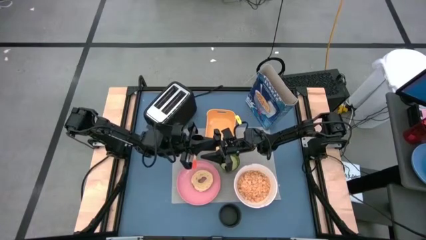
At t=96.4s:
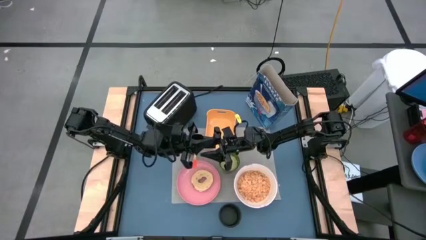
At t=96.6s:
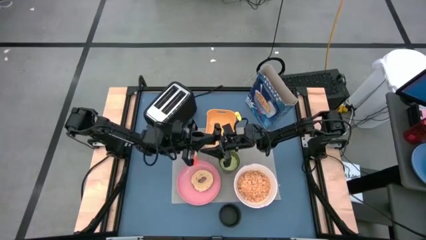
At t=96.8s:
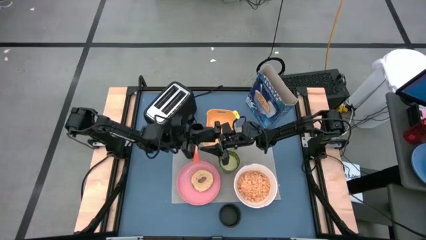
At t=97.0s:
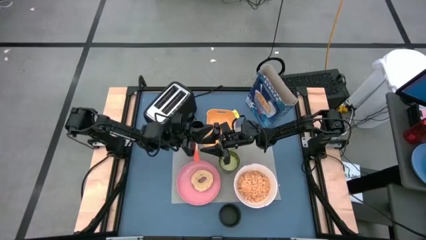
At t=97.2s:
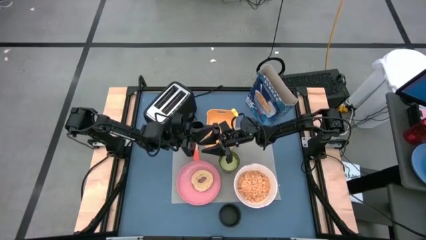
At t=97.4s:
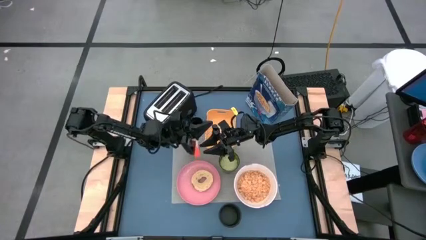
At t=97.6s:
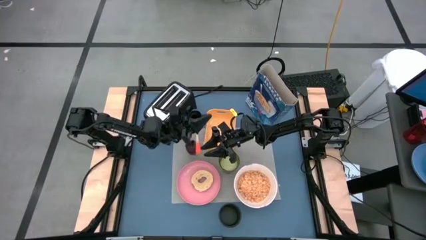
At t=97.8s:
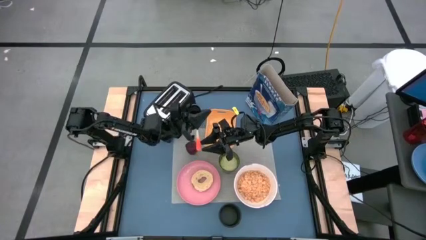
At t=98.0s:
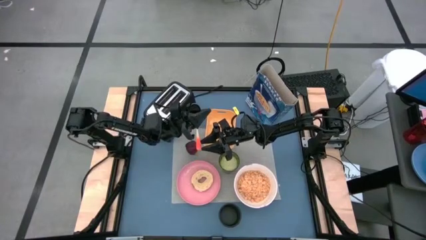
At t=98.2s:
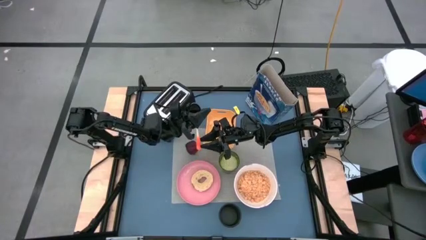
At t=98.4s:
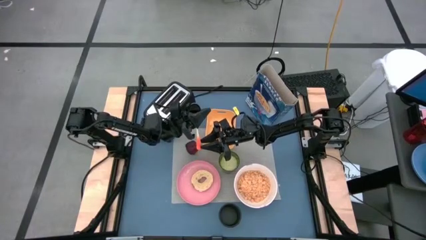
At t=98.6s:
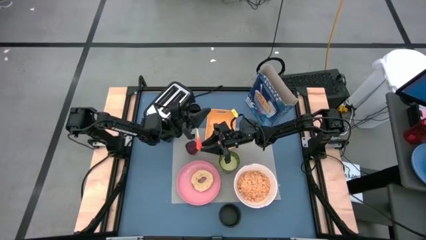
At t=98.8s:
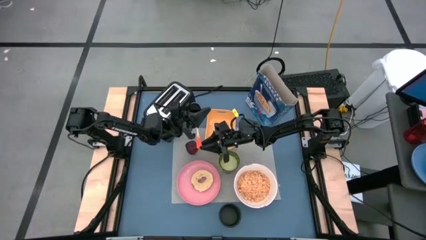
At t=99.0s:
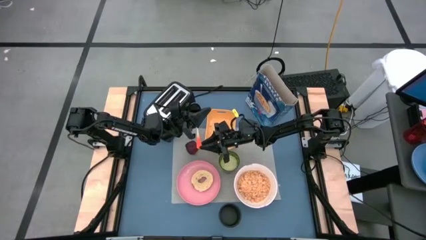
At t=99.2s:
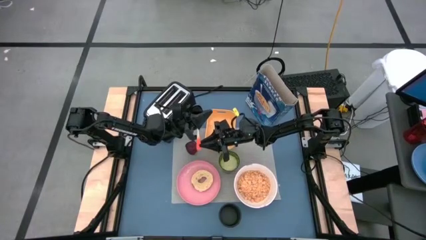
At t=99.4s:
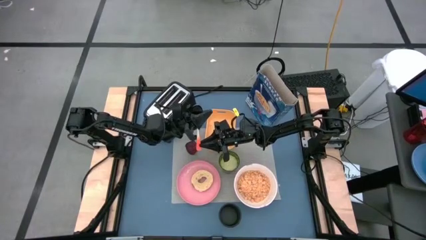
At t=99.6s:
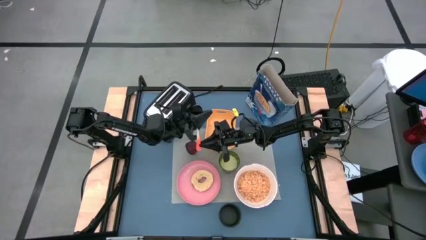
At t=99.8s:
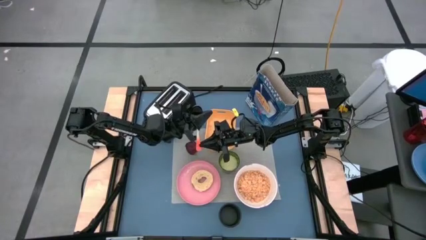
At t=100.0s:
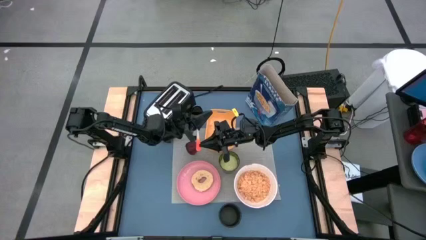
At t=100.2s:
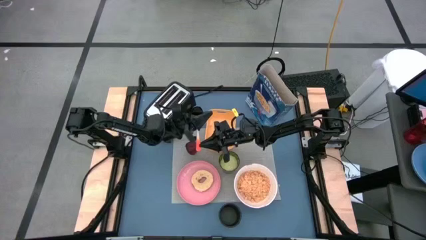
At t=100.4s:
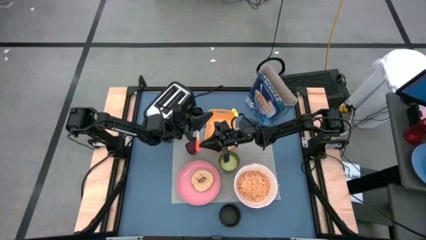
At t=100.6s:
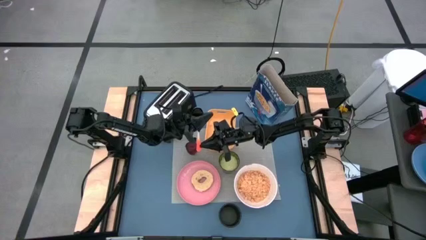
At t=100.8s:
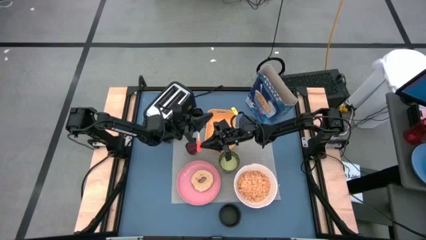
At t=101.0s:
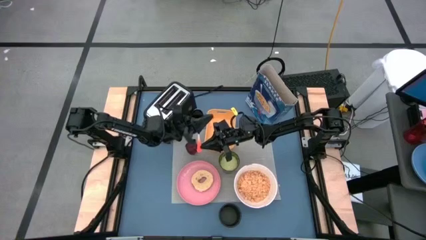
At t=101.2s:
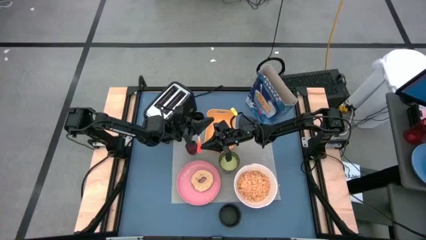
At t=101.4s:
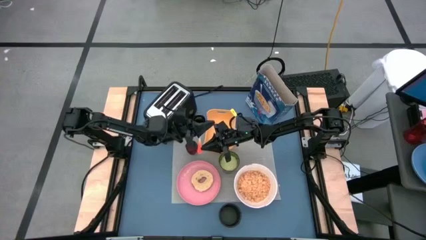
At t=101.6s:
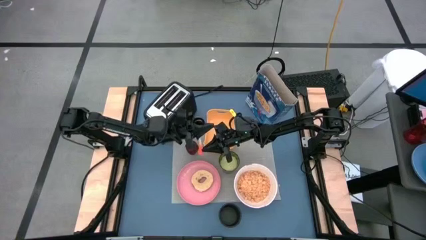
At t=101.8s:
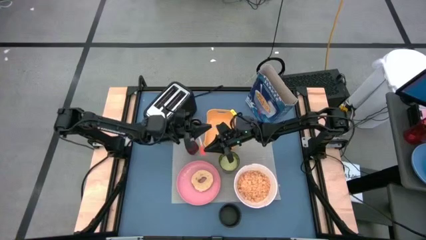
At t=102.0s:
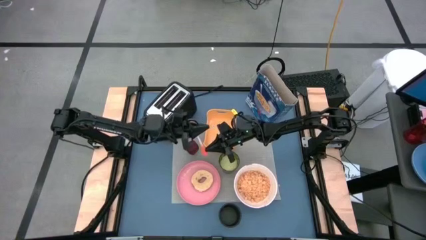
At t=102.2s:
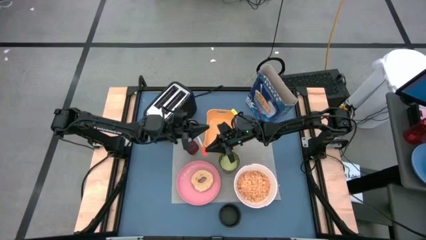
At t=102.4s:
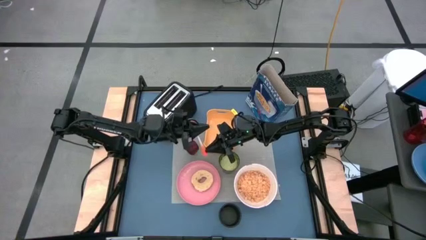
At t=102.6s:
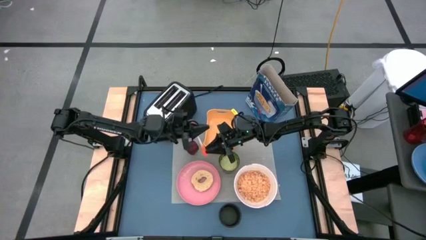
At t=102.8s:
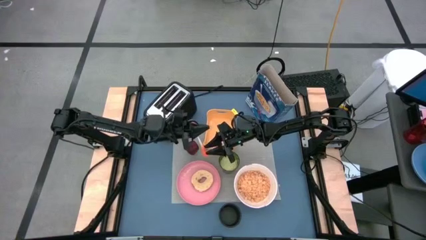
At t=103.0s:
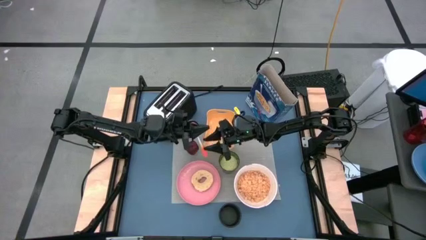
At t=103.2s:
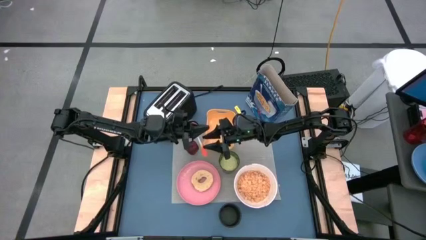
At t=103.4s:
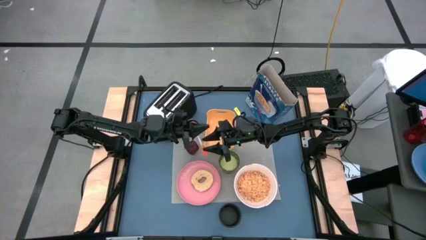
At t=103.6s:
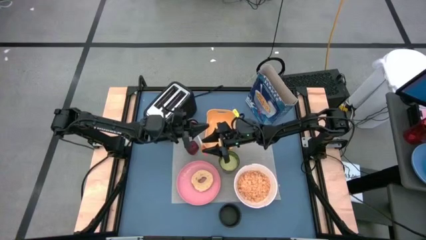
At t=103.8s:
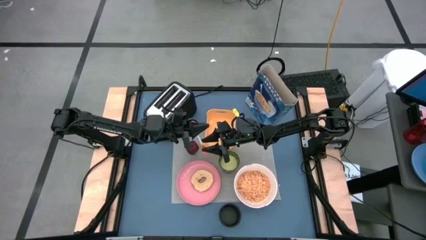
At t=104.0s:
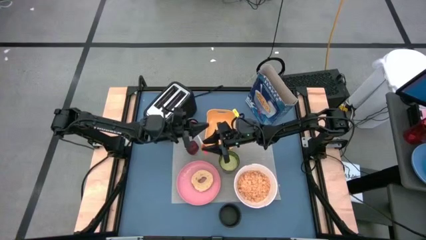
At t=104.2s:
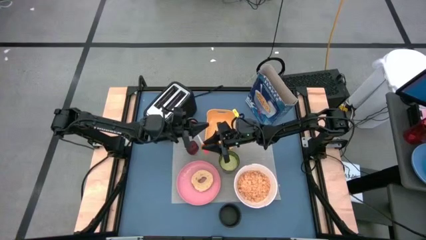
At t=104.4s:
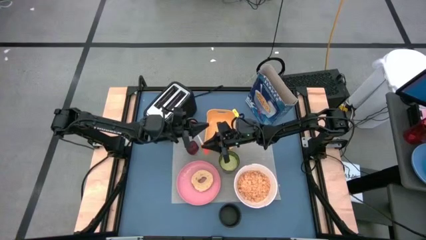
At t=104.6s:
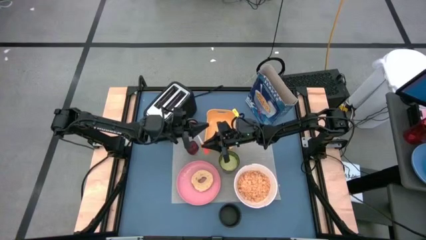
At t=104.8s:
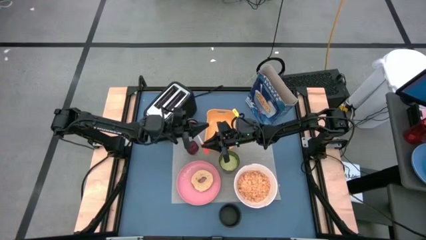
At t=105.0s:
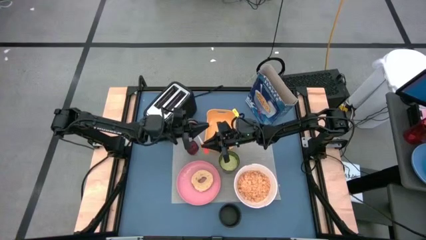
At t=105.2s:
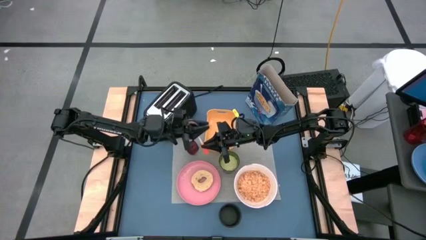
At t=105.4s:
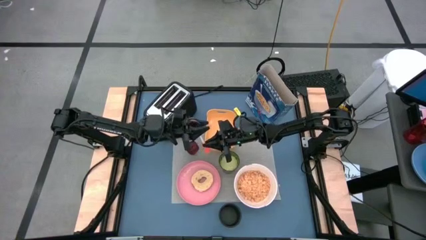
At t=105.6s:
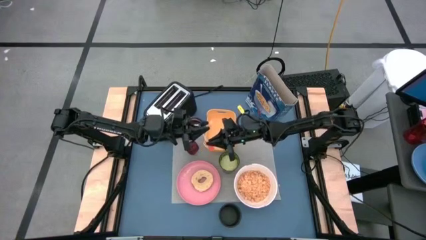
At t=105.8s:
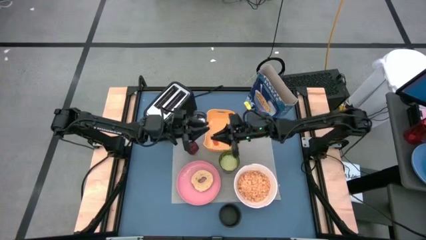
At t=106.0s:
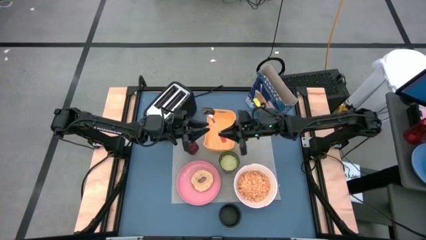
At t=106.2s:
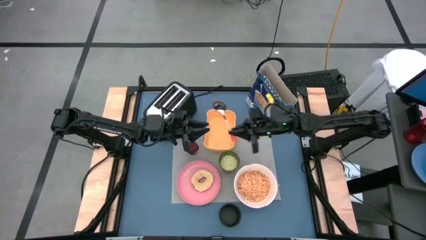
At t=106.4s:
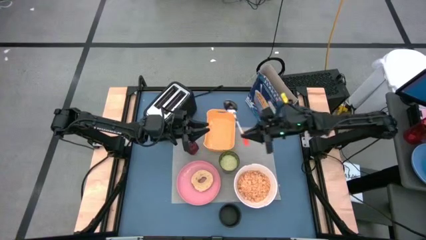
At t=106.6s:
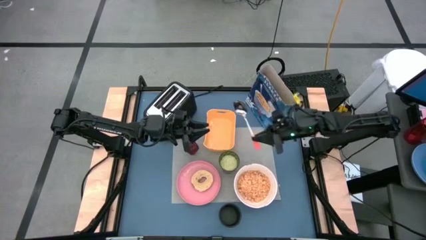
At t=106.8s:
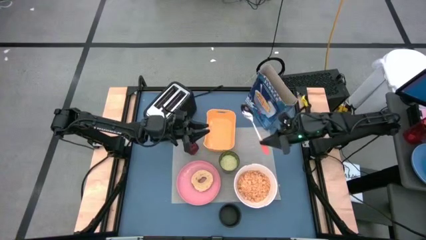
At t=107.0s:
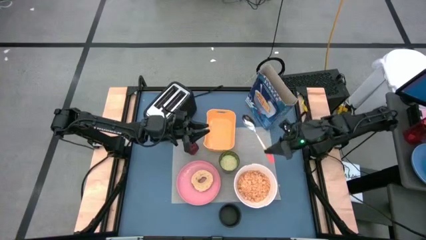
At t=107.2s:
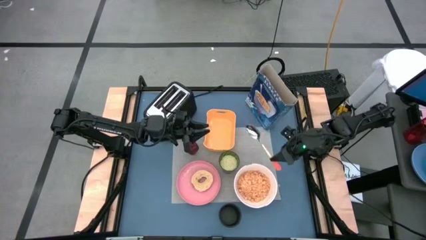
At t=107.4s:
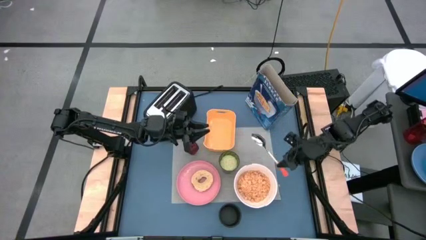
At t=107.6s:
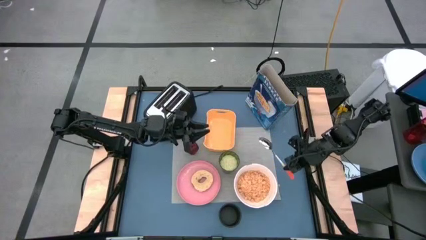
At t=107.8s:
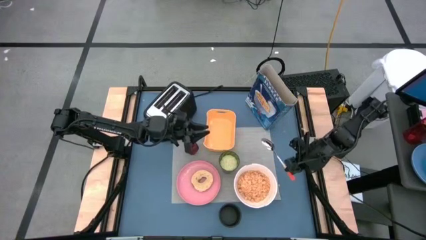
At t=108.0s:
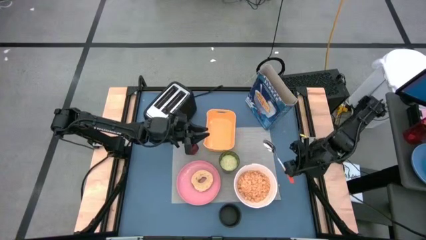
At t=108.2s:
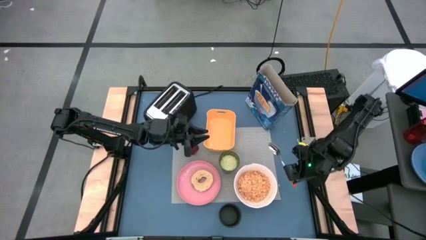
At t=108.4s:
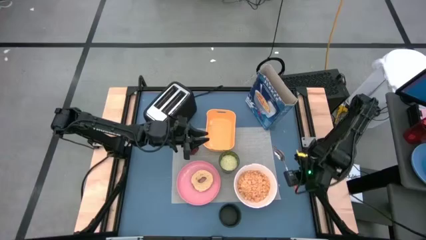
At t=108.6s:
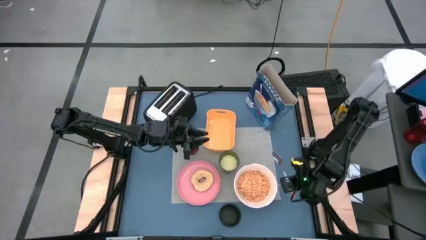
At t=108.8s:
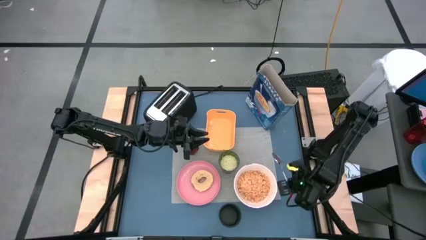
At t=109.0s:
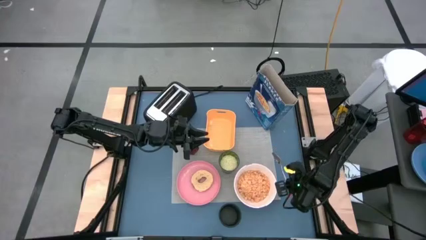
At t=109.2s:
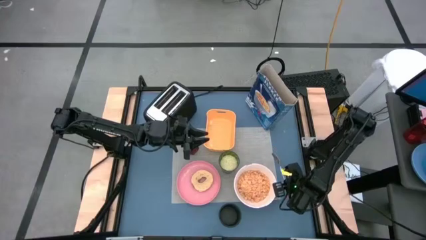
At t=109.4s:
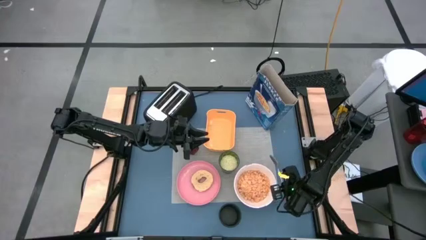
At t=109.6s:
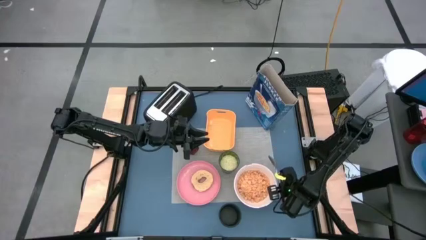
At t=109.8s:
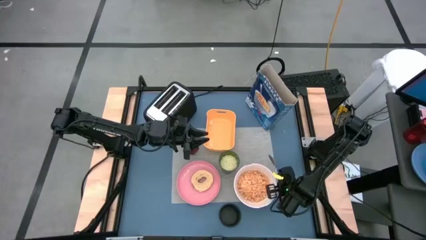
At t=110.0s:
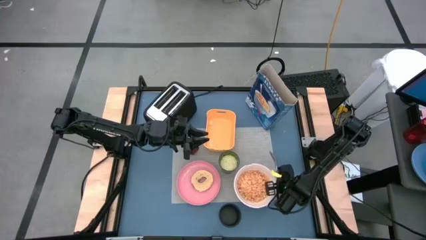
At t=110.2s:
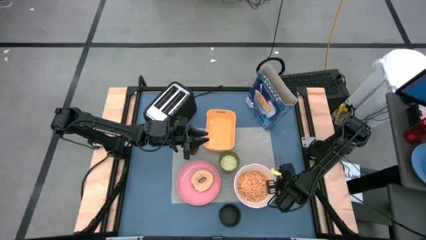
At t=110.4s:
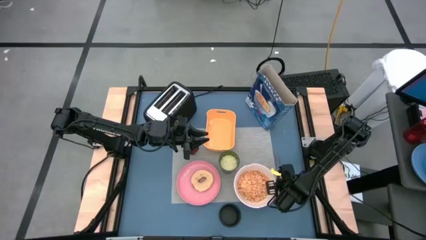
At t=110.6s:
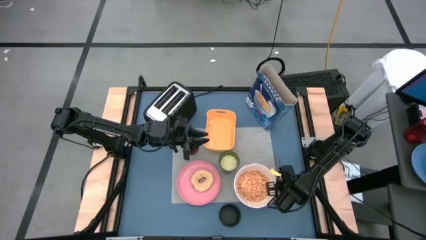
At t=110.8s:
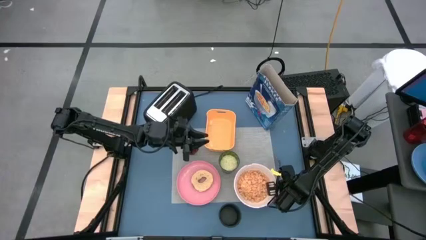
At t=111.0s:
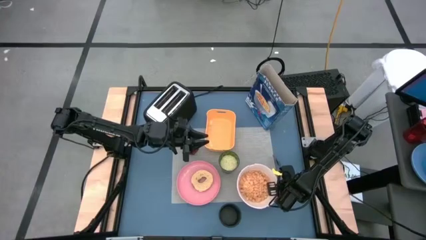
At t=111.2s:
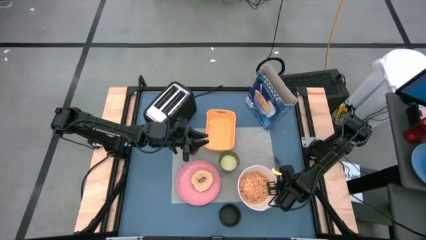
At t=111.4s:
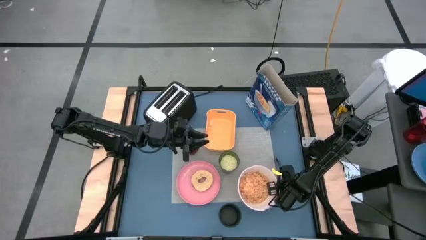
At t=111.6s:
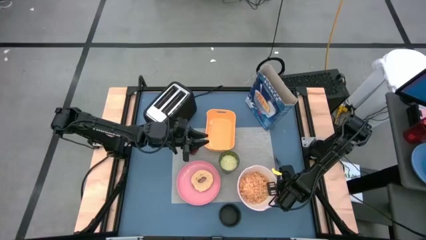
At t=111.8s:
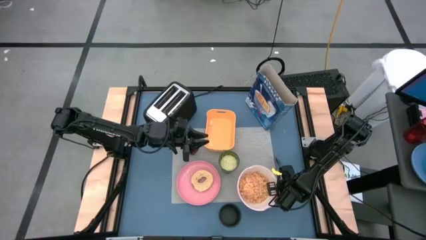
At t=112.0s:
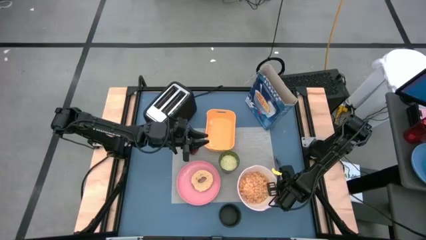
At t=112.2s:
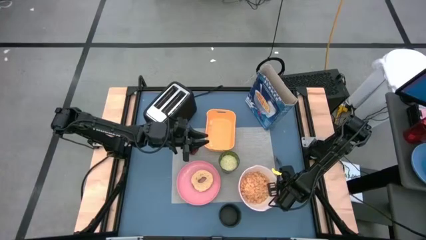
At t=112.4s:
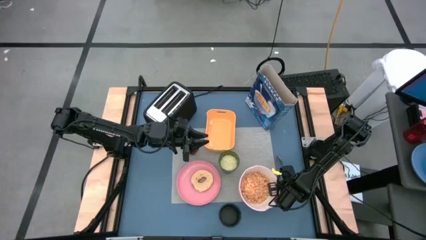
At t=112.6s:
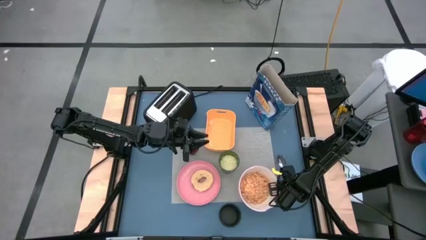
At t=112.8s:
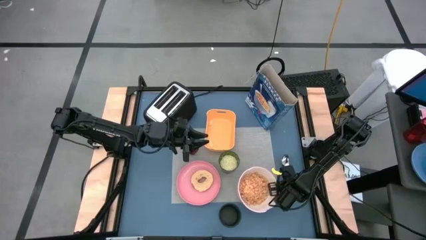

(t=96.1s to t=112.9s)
Task: Arrange a breakfast setting
Put the orange spoon on the right side of the gray table mat
